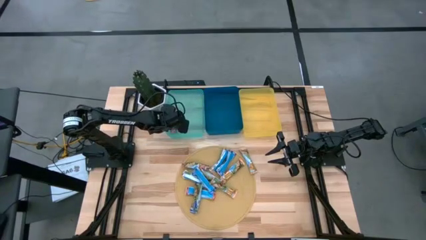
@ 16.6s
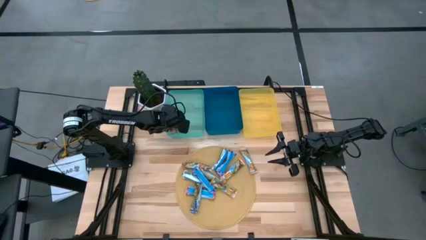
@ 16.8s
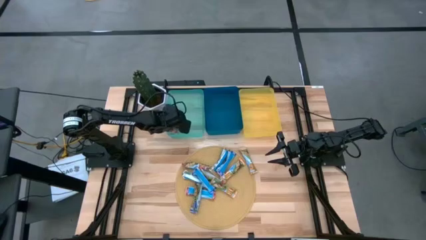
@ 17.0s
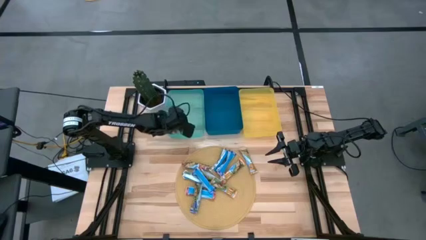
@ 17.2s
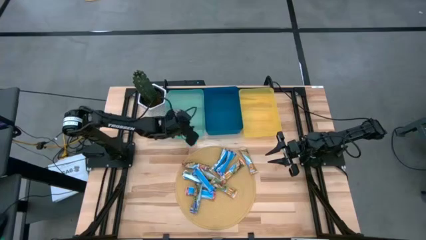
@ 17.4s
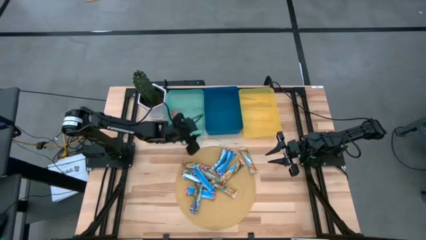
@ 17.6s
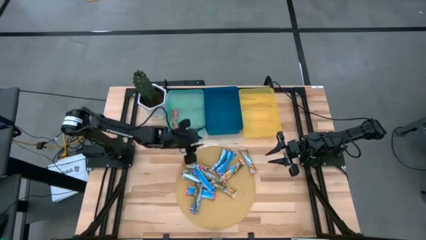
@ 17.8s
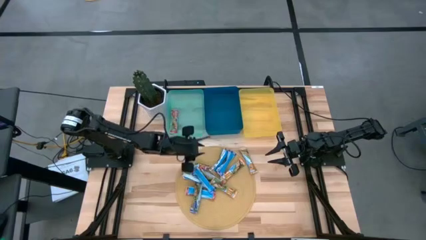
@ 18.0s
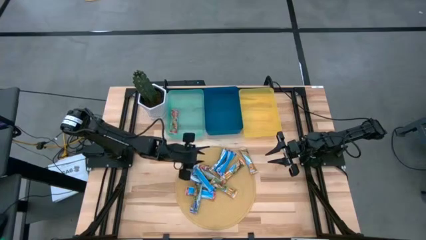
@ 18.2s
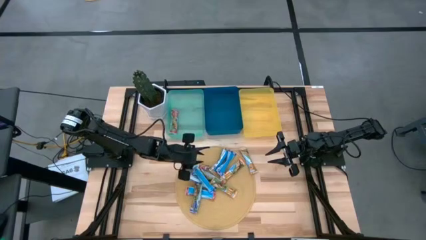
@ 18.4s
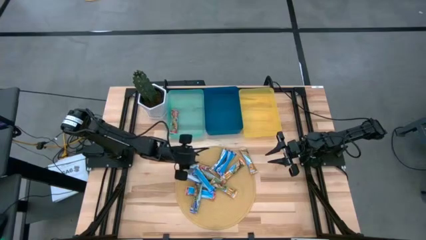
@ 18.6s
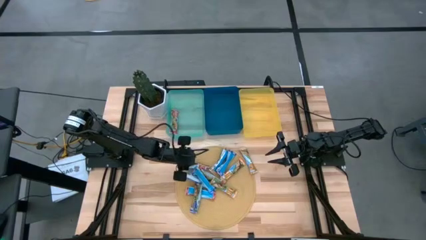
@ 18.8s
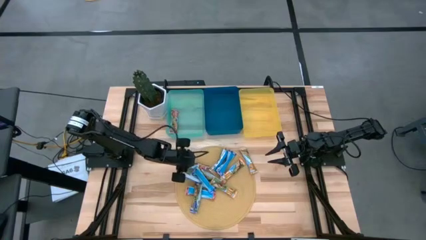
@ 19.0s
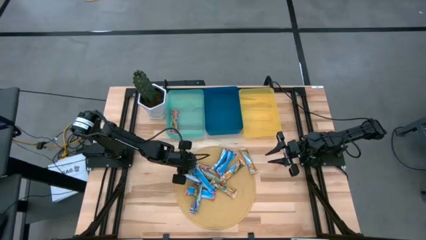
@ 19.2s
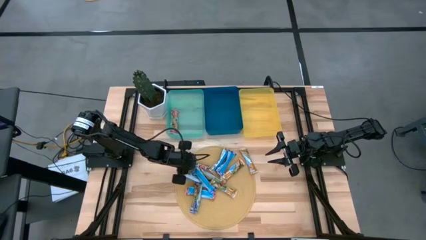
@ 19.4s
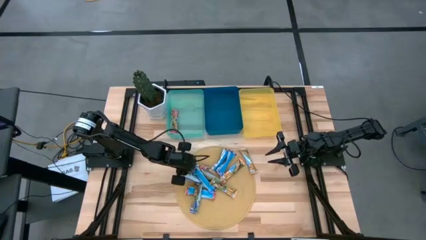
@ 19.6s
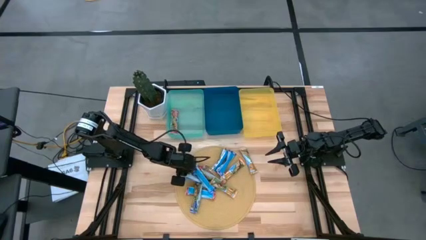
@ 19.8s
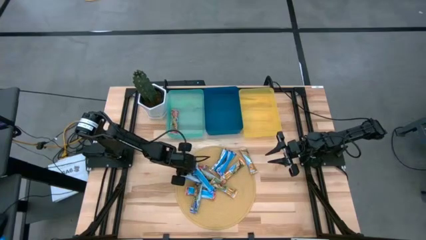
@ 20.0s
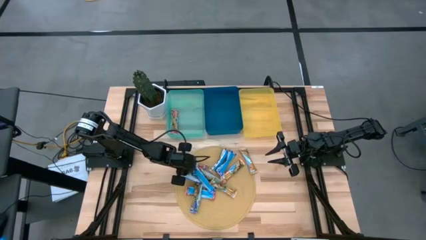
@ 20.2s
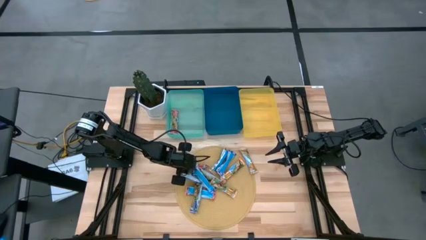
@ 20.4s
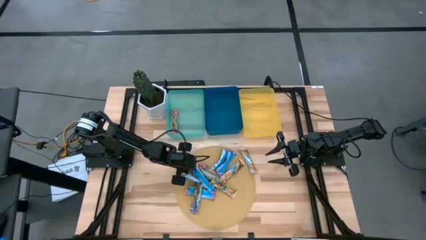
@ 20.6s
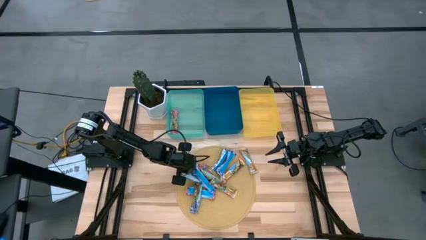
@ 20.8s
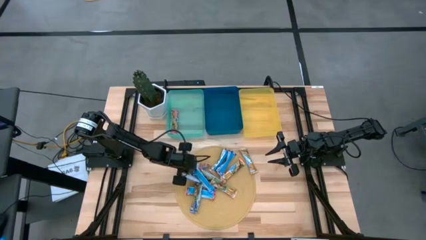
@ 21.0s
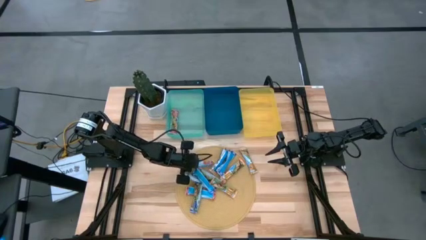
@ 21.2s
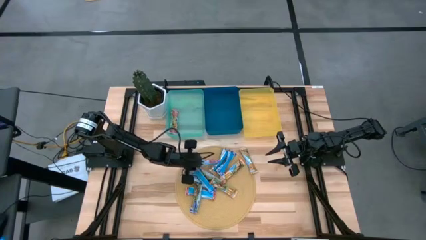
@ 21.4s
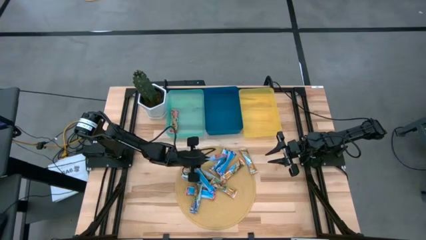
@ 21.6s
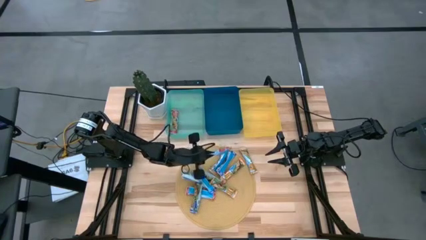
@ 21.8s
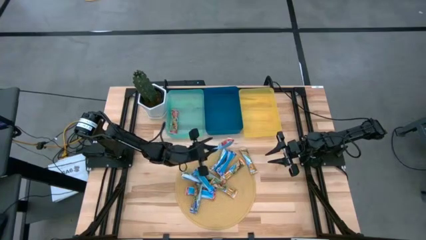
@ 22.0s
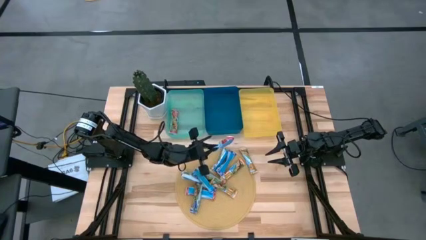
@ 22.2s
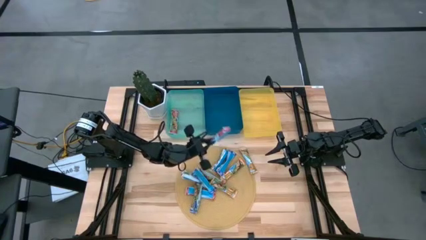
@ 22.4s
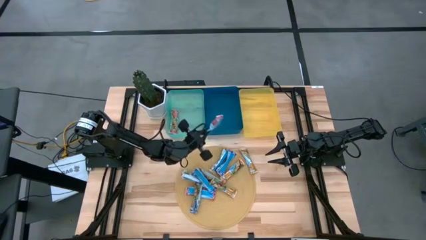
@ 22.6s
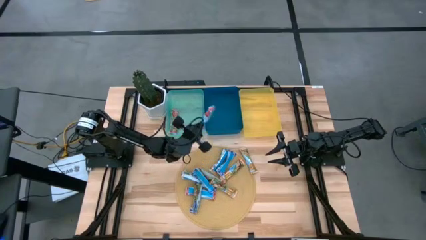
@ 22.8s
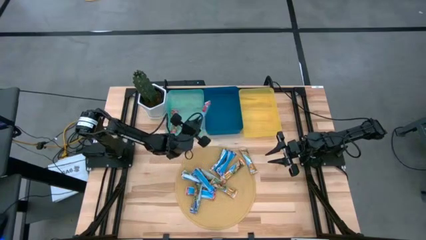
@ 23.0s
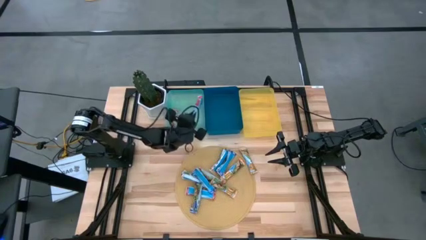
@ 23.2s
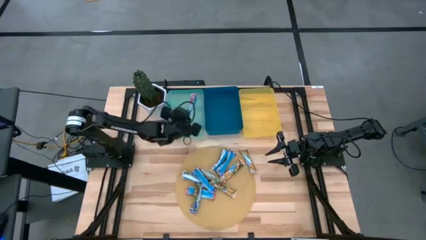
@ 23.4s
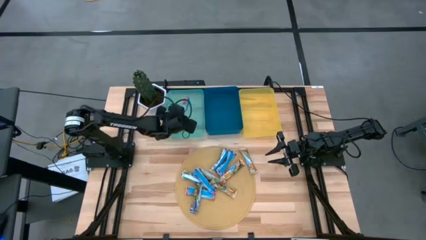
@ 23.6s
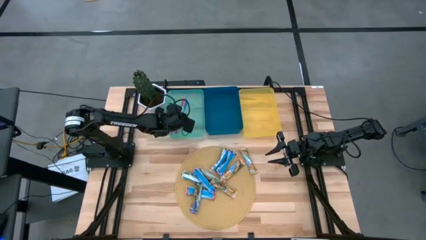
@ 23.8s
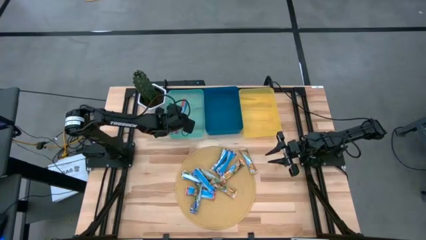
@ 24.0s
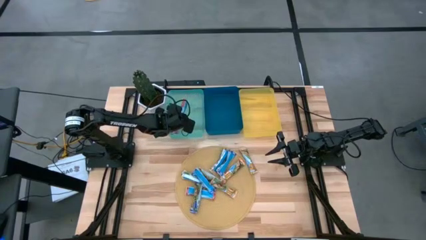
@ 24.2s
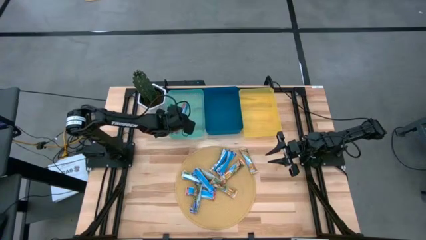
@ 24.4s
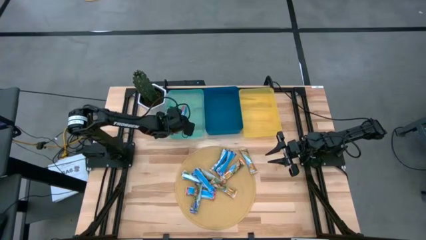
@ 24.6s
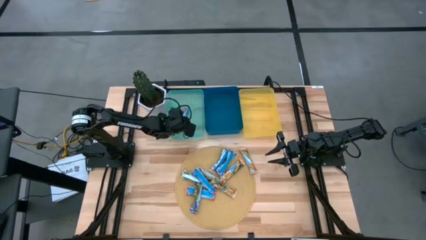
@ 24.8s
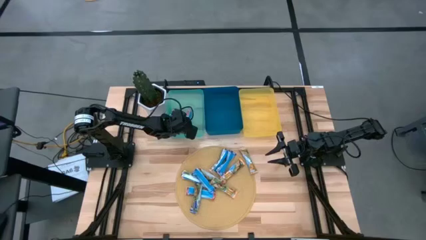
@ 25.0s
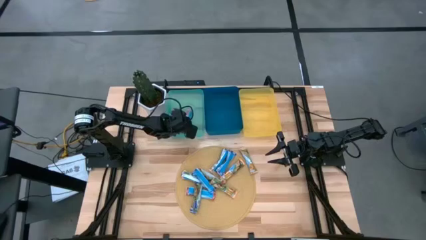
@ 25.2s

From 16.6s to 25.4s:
Task: Pick and place Granola Bars by type
Put the red granola bar into the green bin

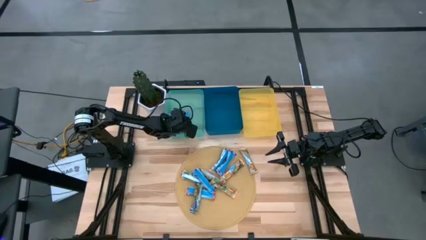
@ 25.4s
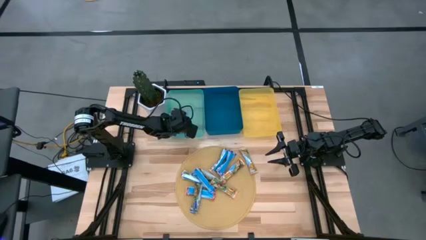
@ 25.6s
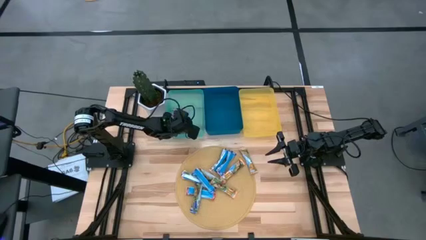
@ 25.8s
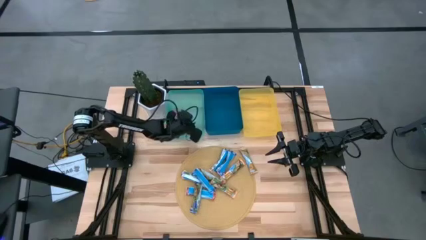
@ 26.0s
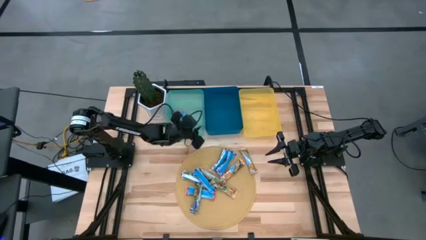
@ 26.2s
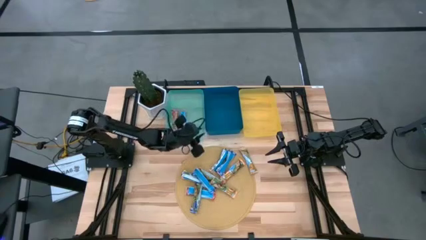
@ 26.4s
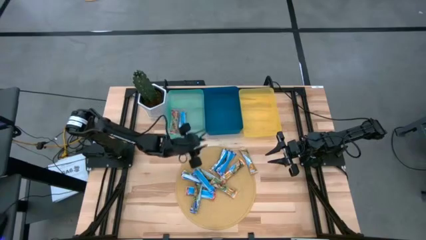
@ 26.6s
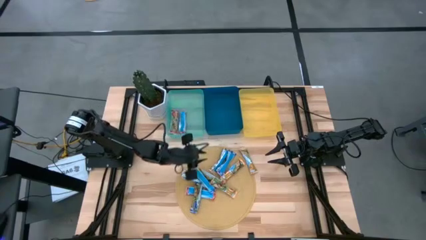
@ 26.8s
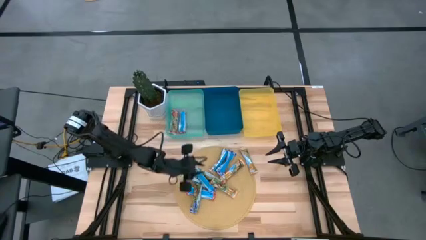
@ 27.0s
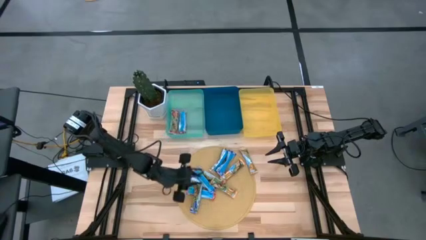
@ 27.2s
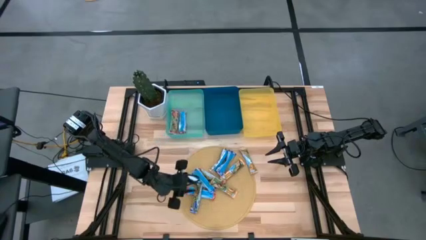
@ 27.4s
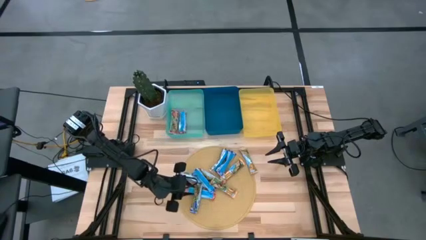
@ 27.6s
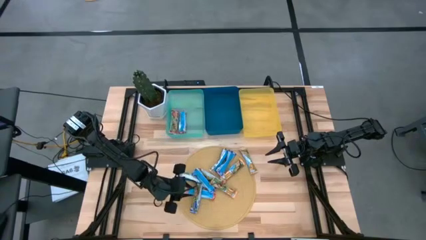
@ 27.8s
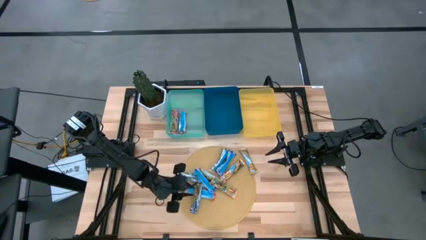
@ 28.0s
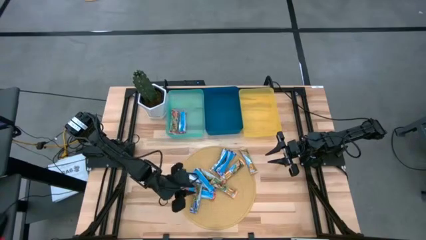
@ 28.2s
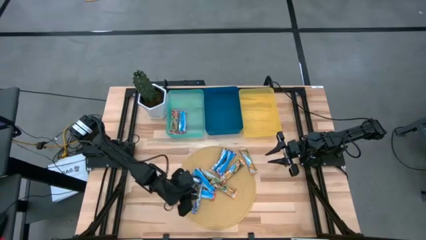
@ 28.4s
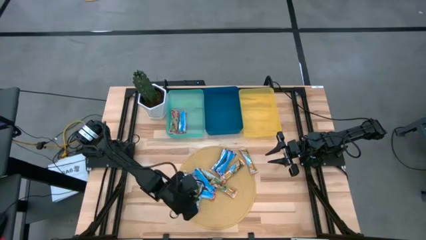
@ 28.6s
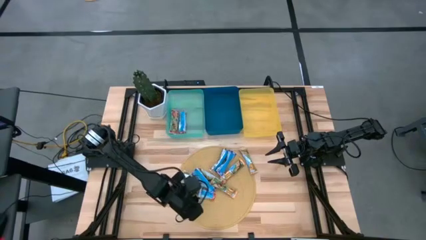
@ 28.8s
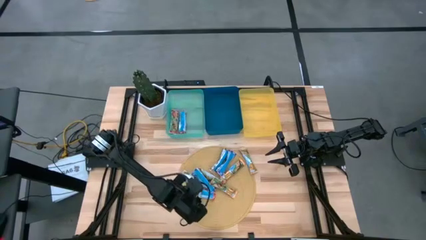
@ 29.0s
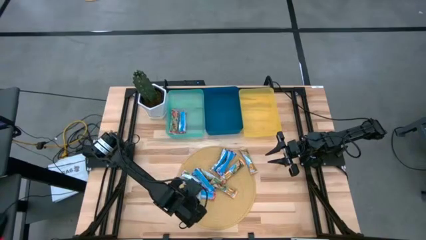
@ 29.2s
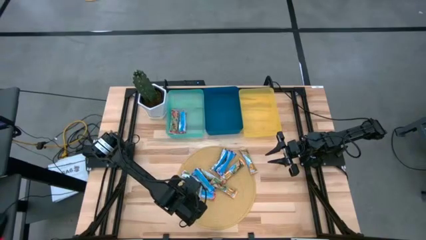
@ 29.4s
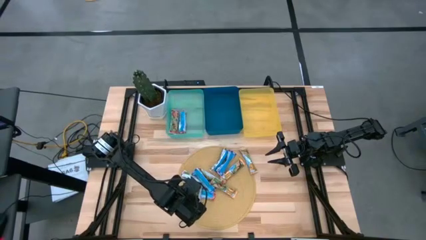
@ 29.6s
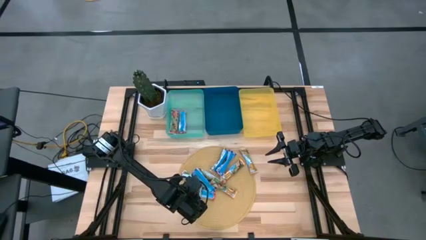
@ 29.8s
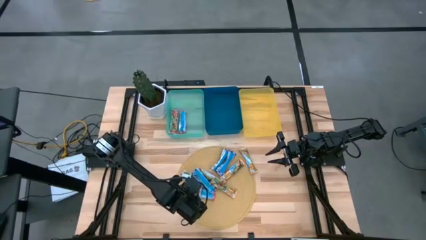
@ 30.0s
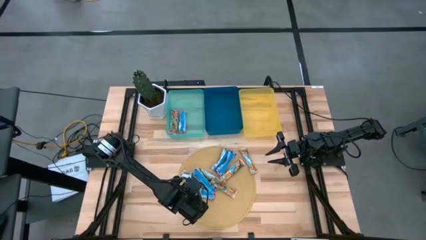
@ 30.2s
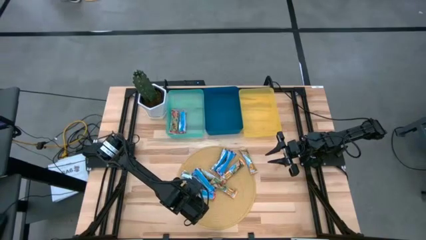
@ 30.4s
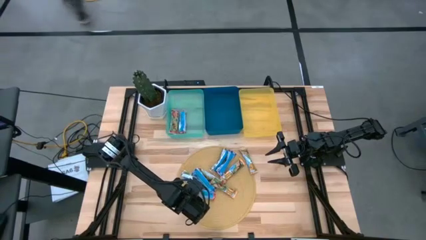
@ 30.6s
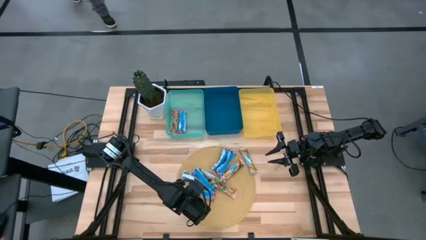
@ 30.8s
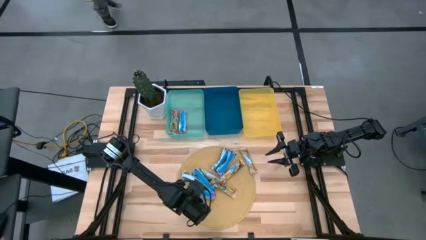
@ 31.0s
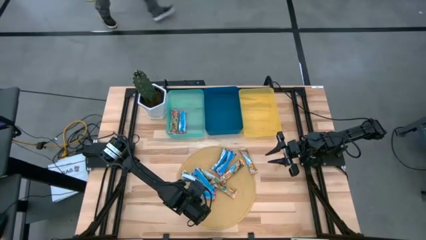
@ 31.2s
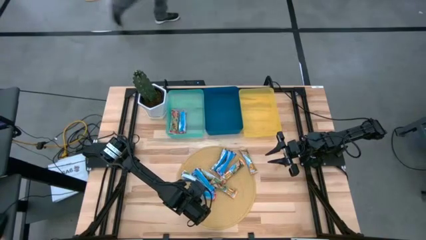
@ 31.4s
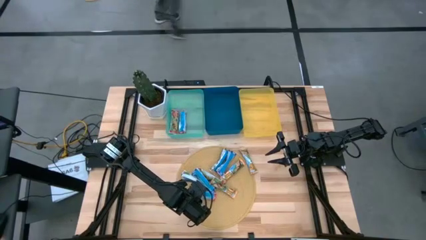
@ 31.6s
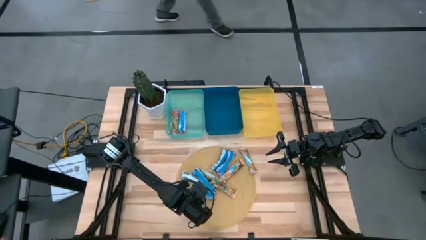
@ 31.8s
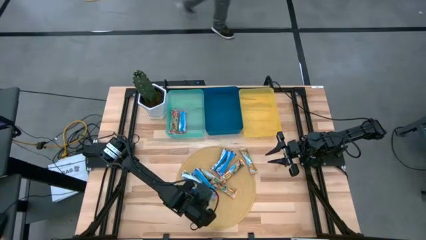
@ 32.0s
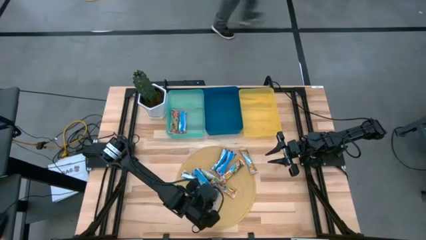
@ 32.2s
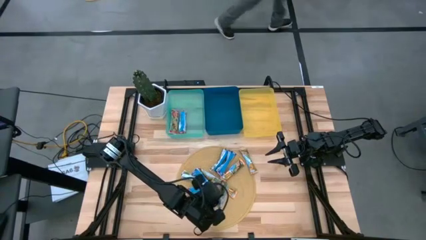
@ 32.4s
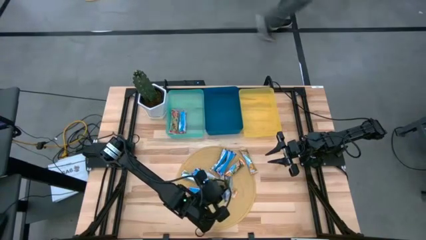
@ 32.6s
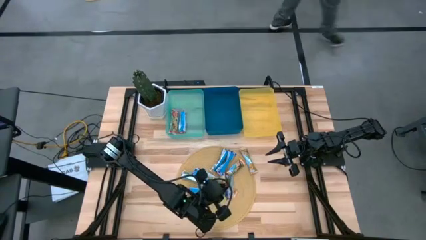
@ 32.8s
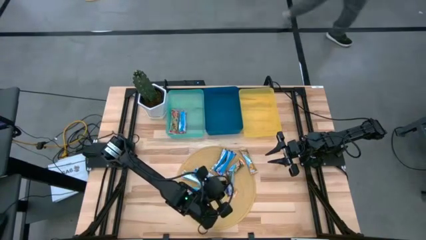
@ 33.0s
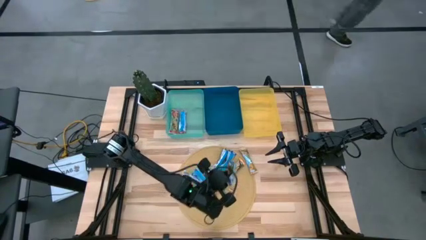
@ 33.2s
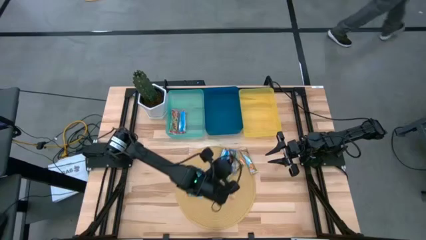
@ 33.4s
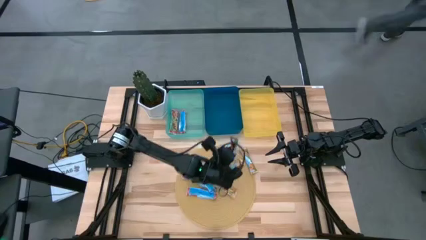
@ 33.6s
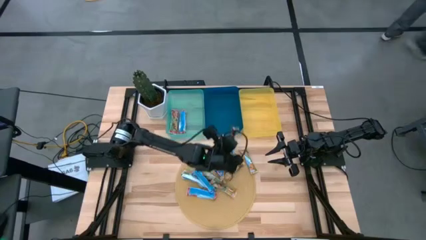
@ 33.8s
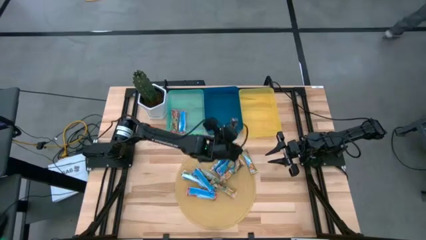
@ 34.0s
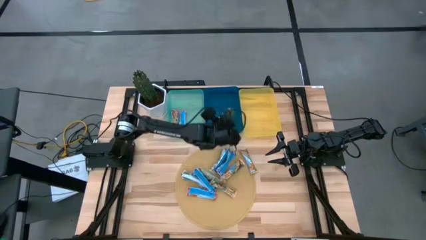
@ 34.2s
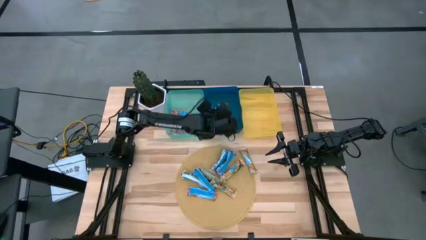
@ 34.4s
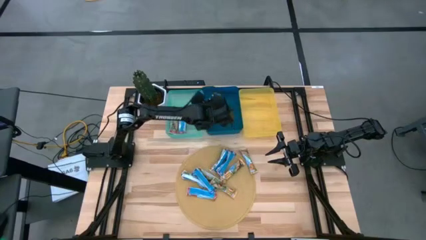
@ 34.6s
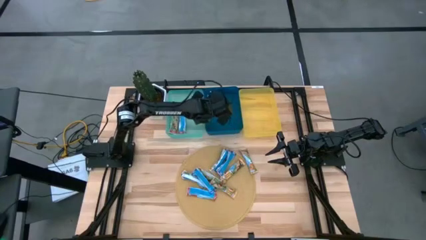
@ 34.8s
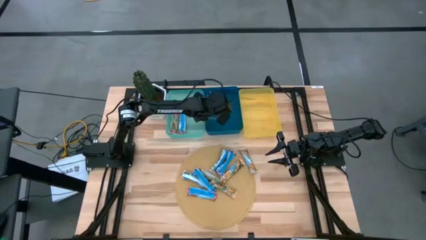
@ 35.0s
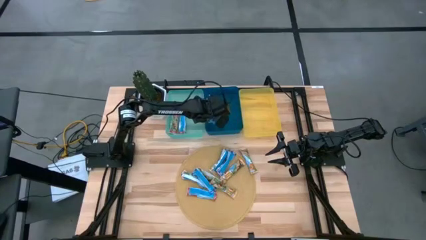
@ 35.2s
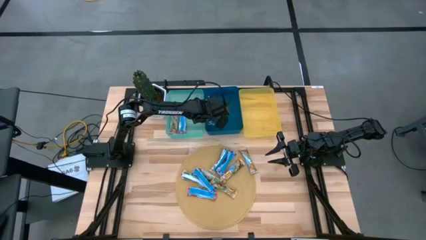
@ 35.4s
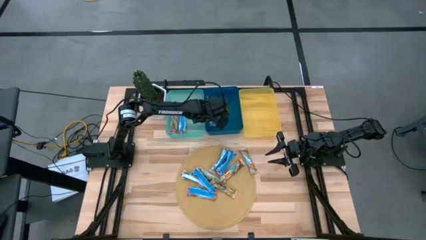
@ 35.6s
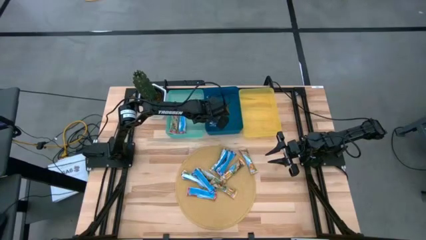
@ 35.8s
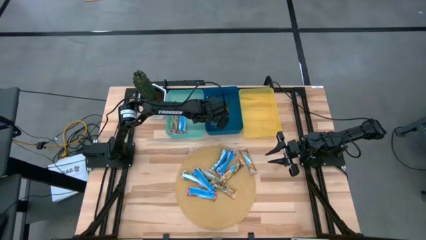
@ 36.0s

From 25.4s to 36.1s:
Put the blue granola bar into the blue bin
